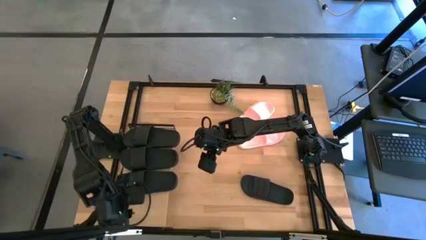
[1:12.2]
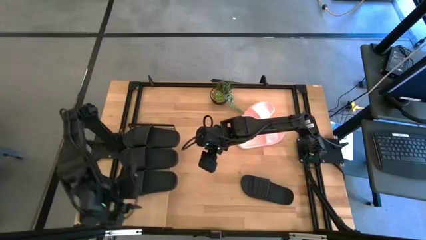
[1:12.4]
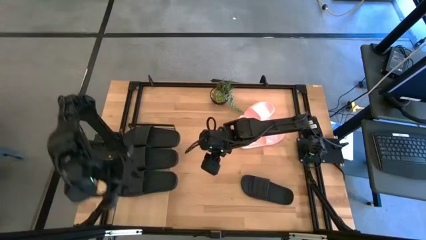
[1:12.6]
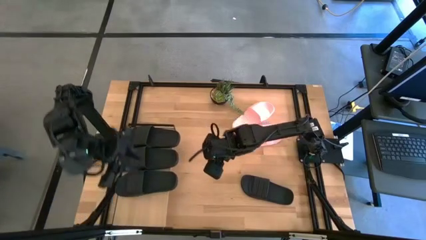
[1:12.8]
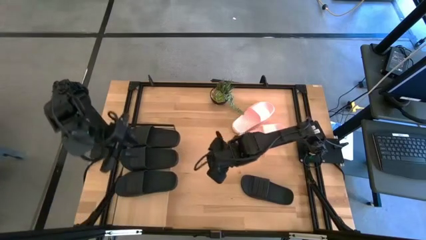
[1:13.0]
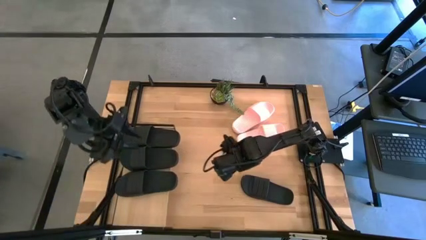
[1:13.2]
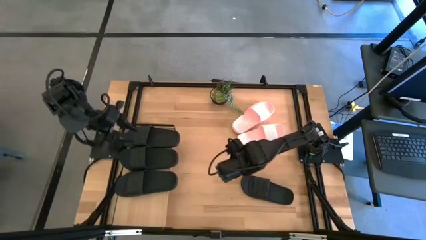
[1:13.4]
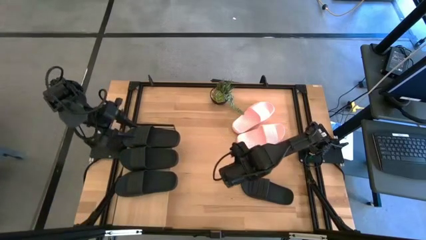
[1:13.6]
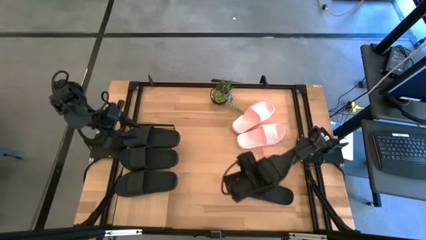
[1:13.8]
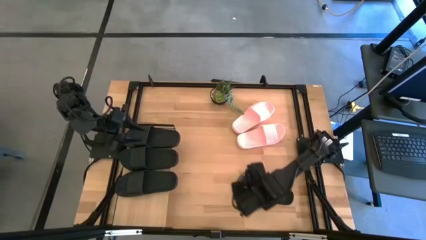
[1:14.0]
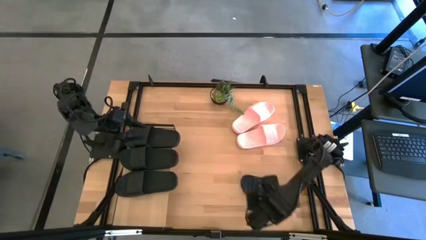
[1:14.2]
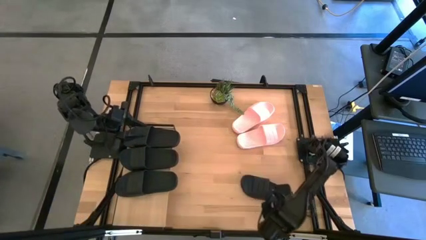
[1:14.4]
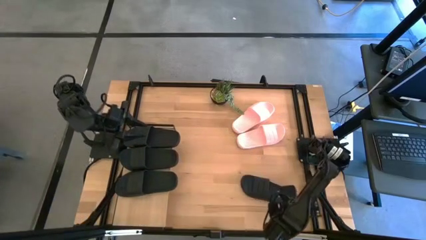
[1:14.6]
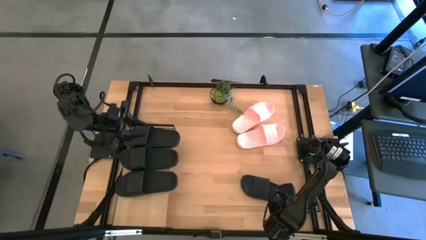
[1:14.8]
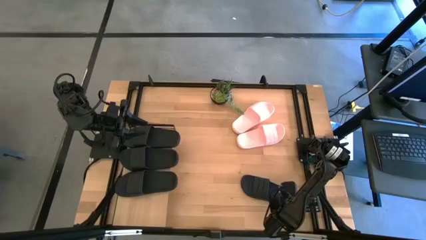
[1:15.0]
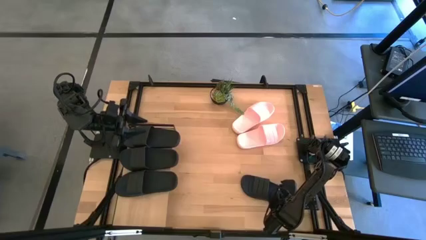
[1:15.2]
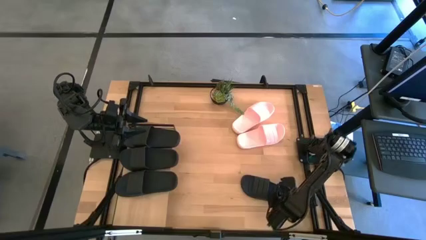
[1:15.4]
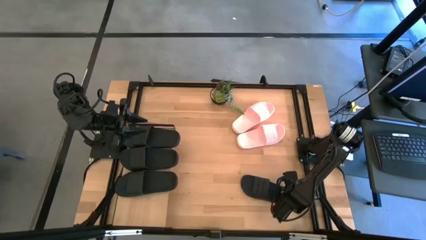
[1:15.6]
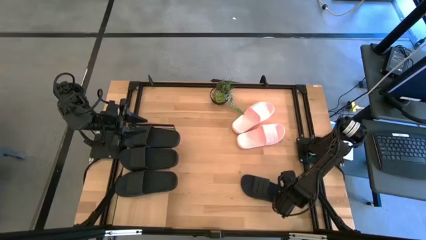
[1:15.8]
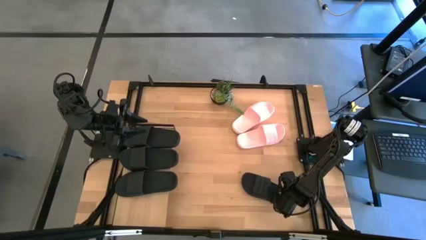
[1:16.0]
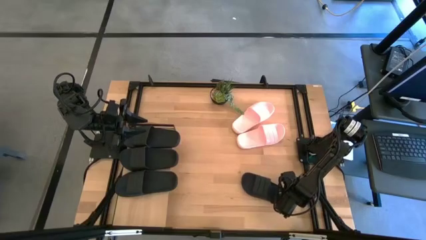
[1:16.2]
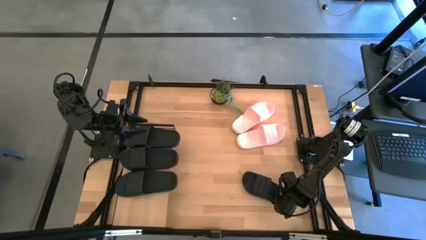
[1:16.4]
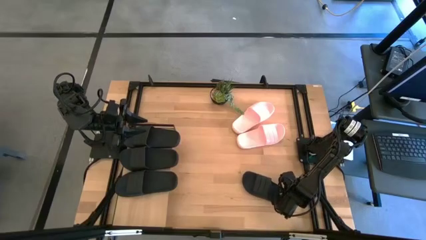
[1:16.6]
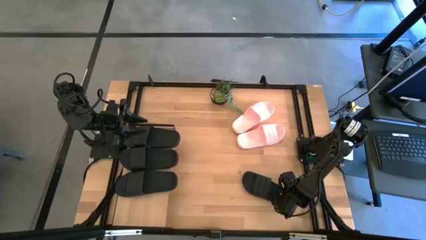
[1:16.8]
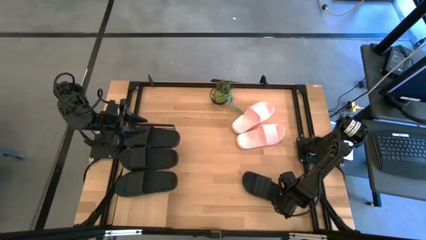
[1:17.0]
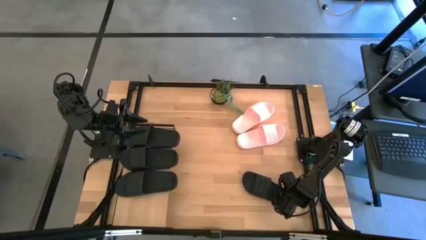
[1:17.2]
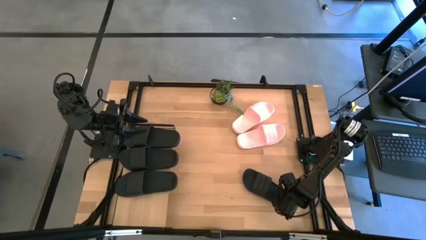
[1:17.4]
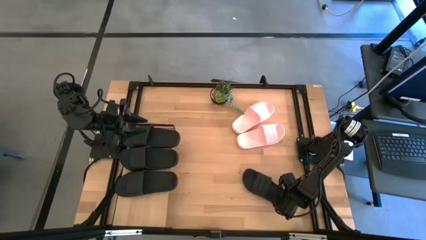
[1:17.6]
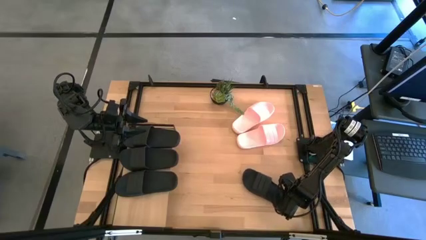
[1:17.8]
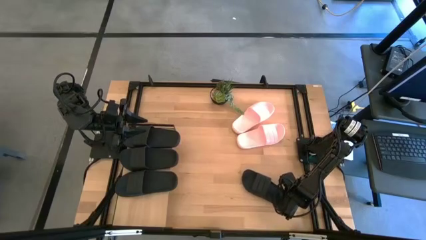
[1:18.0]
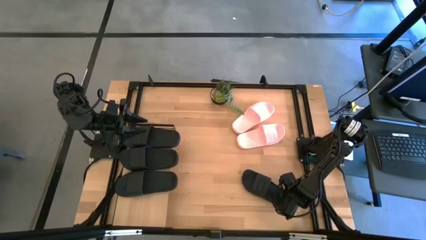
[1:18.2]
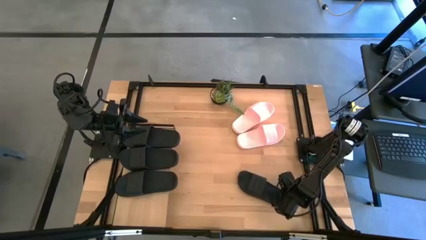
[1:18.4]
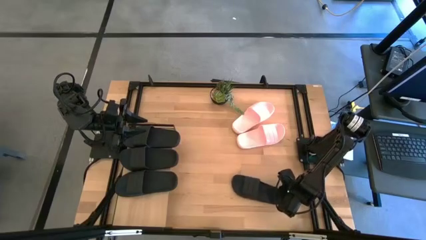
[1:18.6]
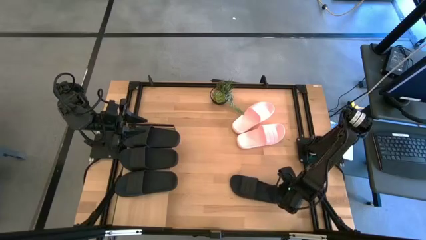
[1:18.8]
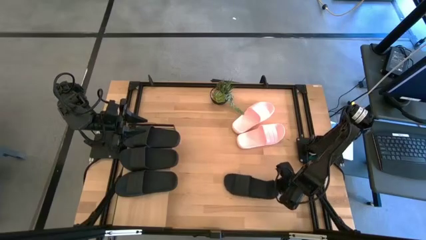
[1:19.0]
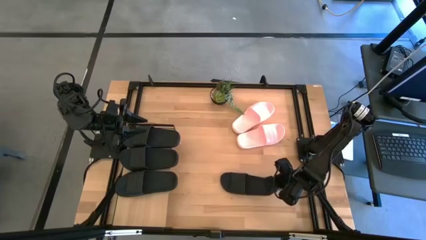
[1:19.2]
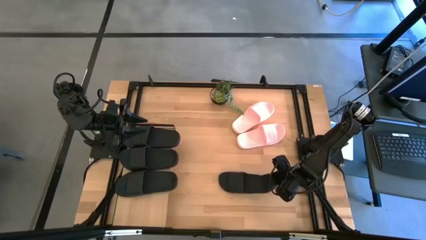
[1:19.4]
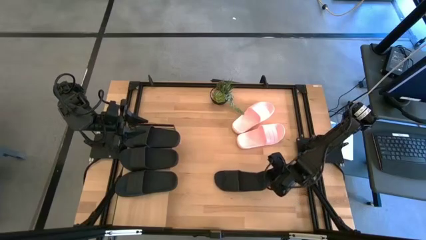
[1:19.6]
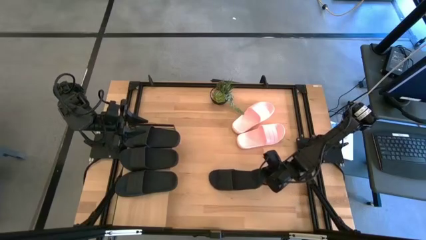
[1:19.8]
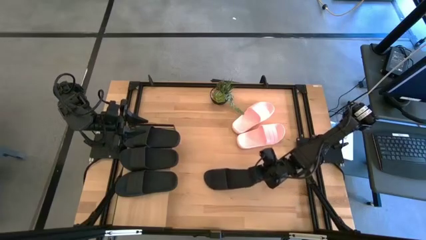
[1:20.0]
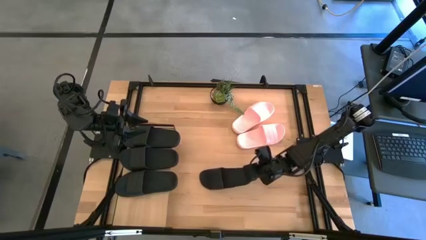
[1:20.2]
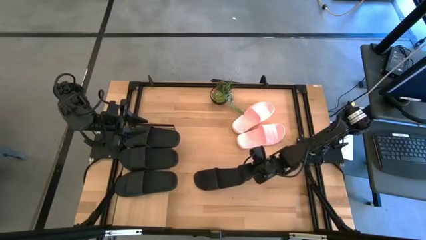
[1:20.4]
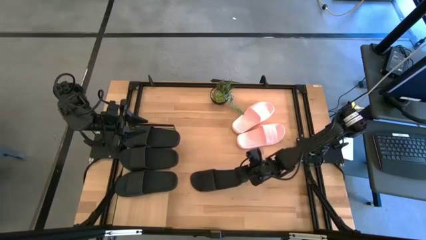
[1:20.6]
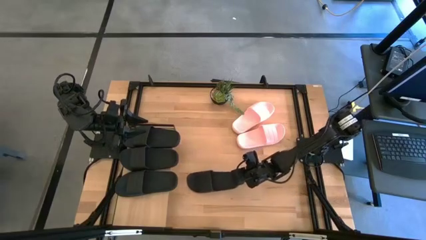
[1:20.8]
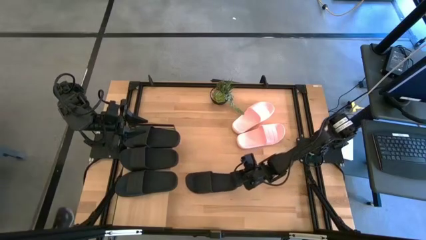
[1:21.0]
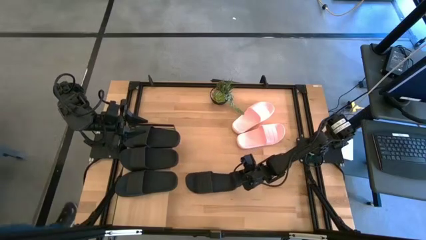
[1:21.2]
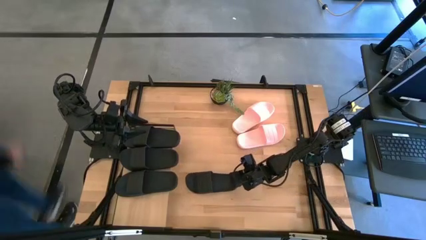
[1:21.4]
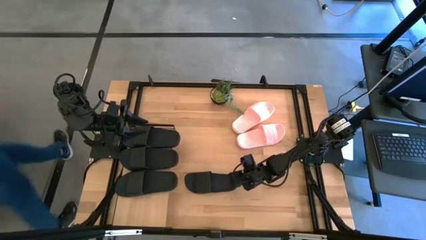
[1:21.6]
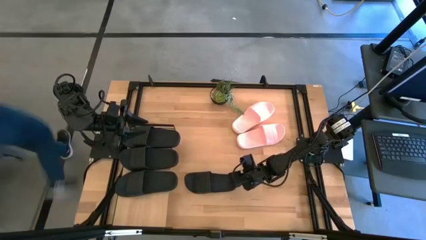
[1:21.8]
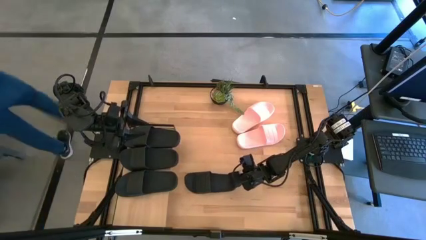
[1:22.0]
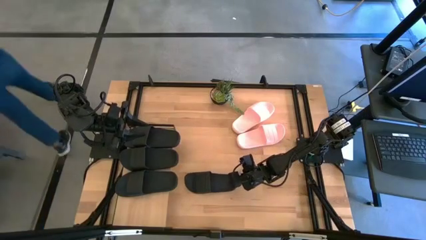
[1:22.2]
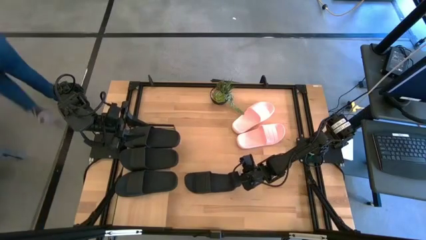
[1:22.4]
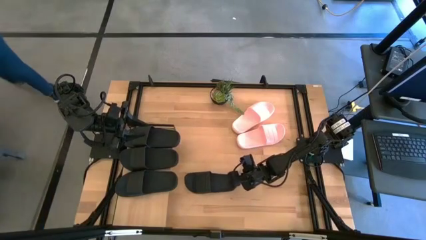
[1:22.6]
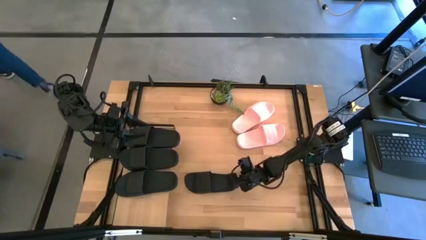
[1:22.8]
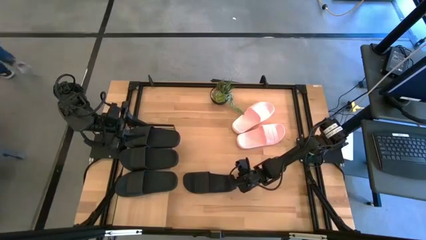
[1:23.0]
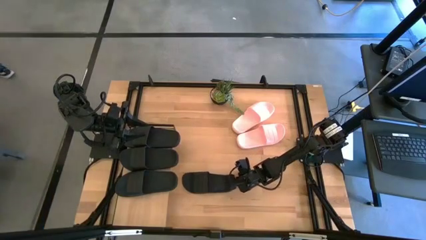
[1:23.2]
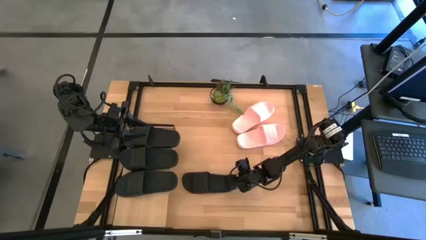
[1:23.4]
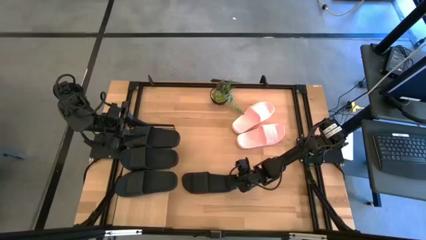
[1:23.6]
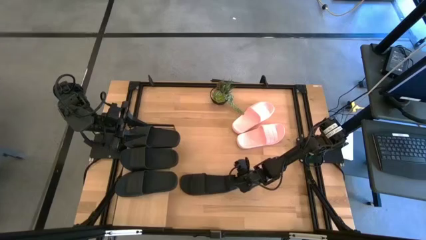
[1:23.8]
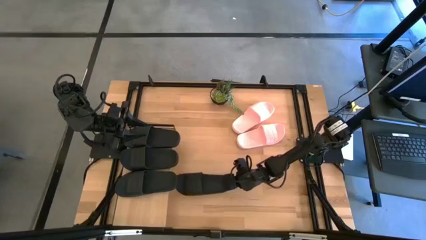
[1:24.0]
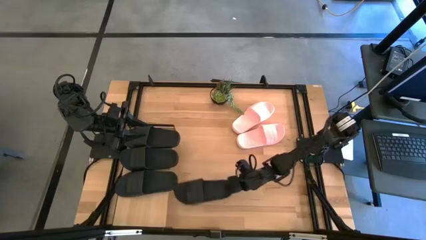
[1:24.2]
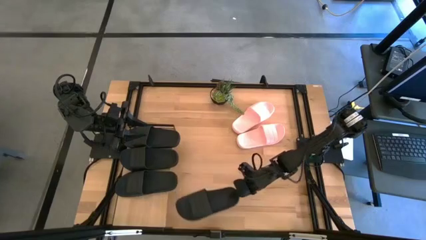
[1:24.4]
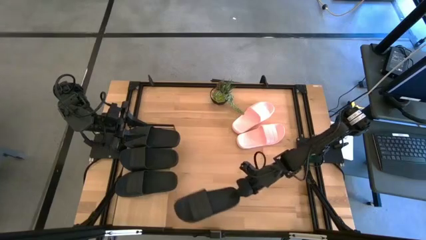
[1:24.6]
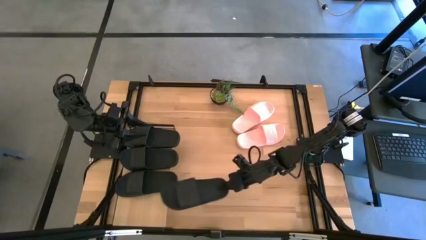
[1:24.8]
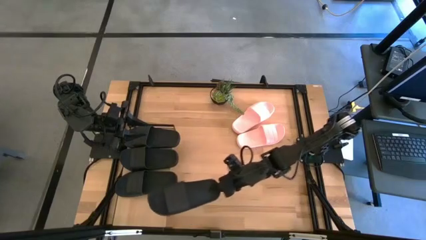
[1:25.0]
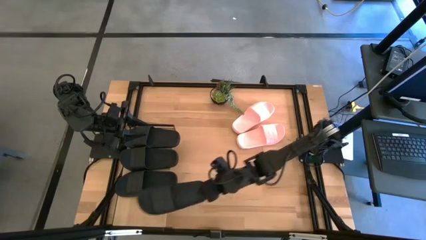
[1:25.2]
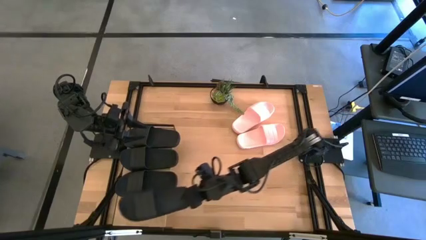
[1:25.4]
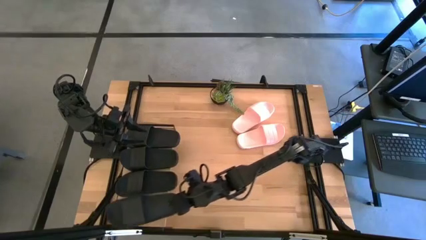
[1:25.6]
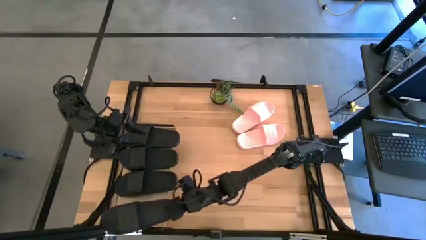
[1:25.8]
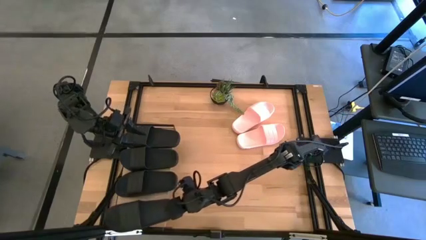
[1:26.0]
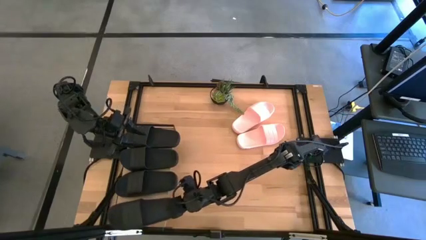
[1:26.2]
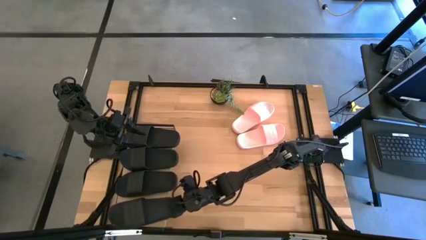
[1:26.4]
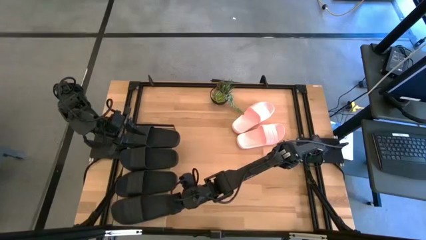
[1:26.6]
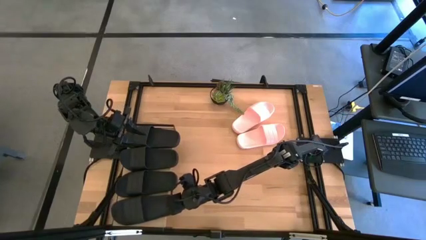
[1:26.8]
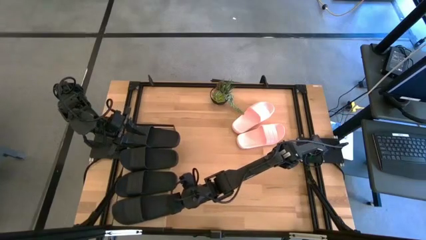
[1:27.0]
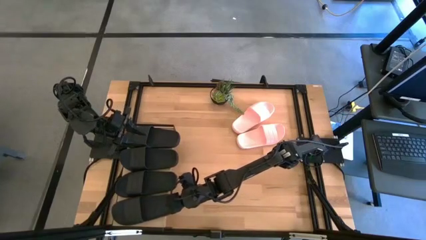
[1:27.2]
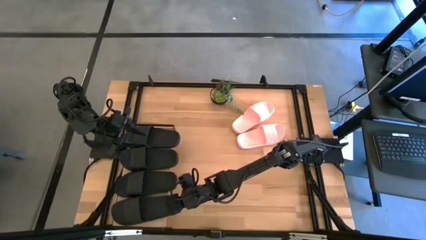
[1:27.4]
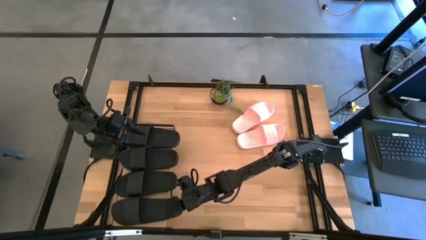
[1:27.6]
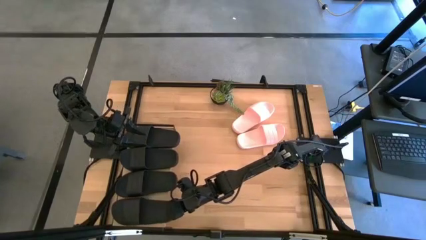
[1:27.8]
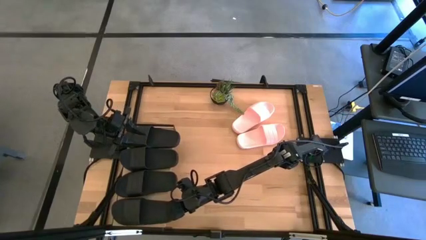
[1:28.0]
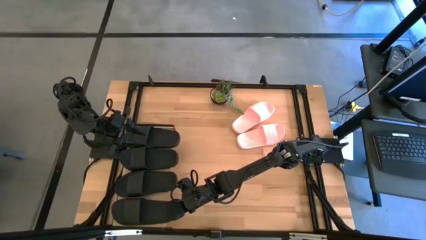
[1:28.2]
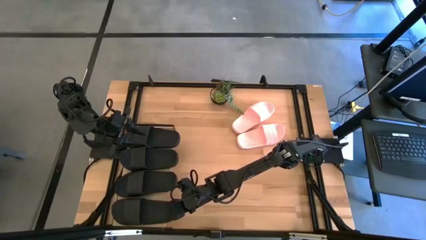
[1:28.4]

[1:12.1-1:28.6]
Task: Pick and place slides into the shelf
Put the black slipper on the shelf
